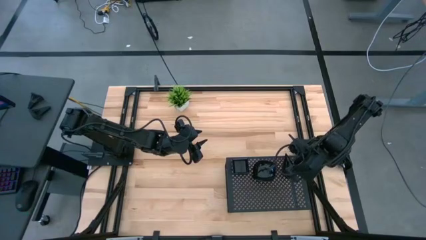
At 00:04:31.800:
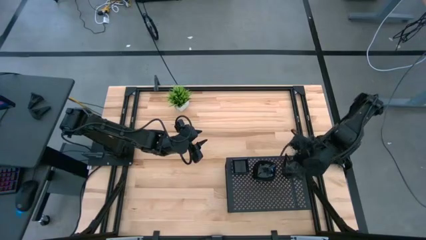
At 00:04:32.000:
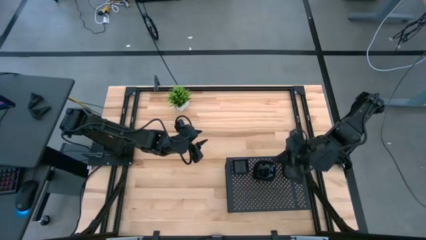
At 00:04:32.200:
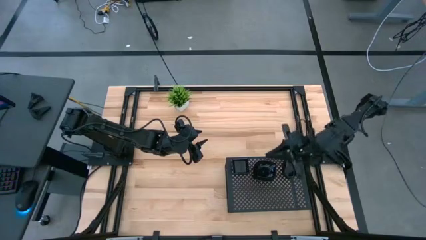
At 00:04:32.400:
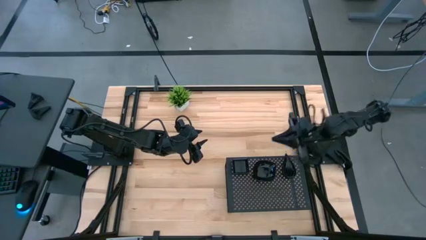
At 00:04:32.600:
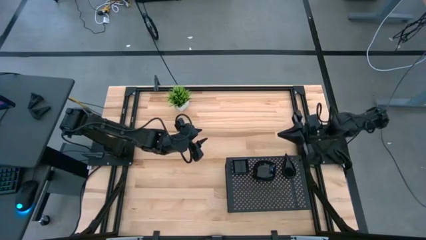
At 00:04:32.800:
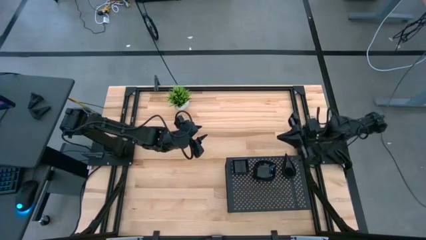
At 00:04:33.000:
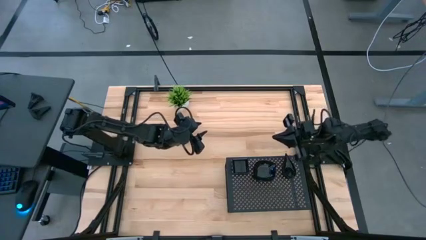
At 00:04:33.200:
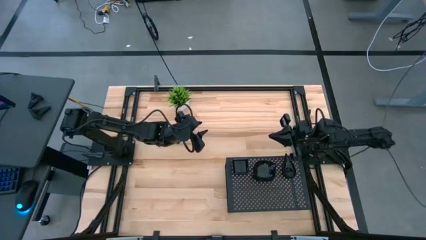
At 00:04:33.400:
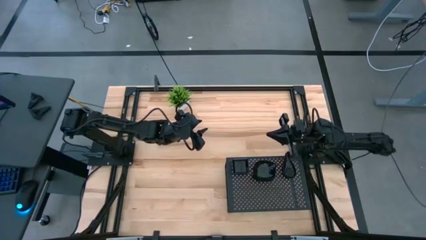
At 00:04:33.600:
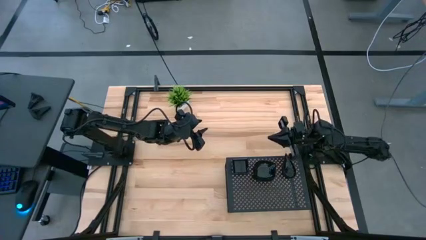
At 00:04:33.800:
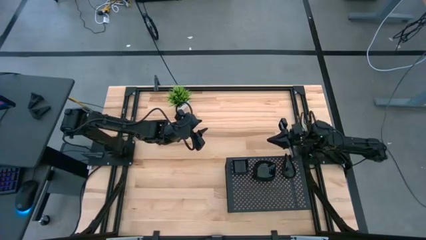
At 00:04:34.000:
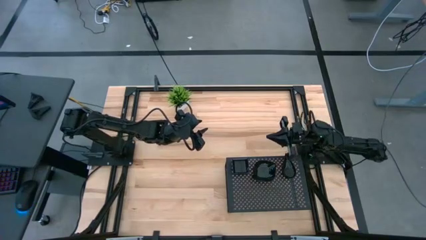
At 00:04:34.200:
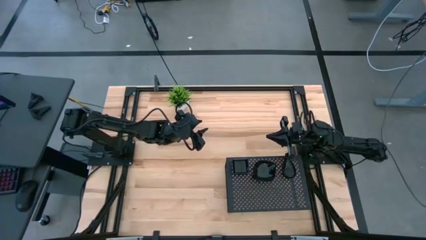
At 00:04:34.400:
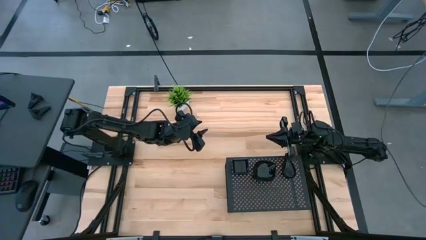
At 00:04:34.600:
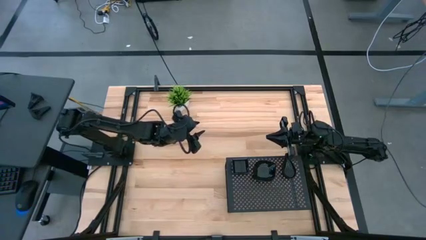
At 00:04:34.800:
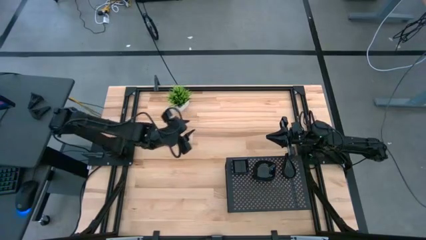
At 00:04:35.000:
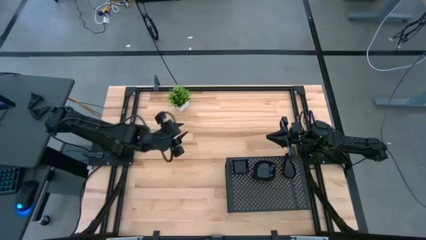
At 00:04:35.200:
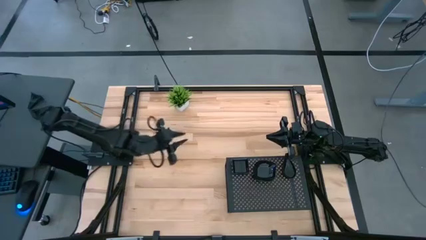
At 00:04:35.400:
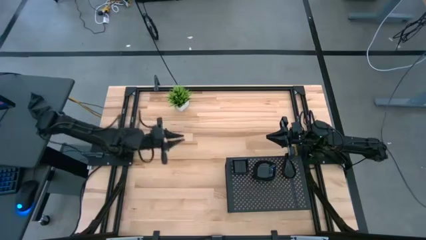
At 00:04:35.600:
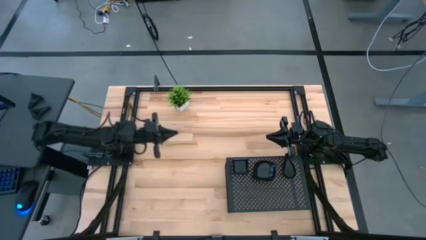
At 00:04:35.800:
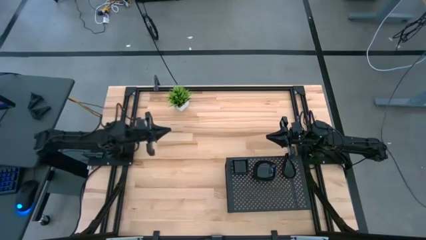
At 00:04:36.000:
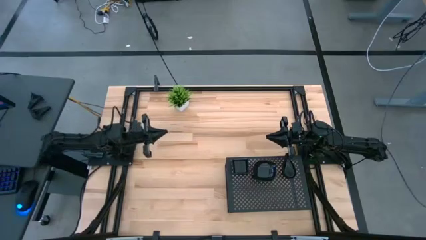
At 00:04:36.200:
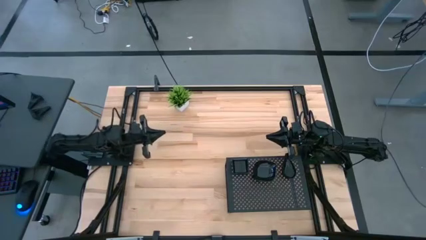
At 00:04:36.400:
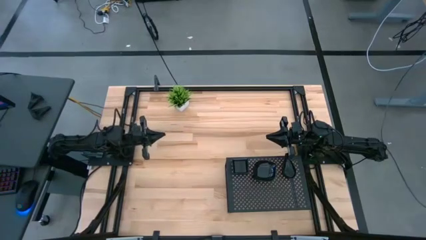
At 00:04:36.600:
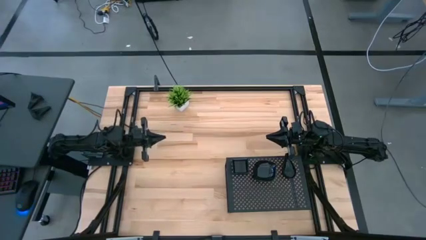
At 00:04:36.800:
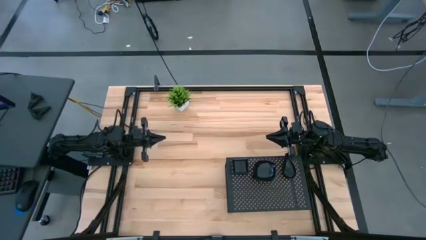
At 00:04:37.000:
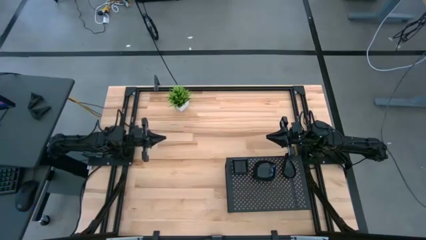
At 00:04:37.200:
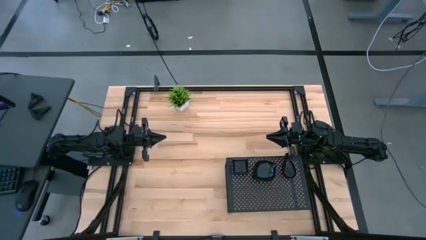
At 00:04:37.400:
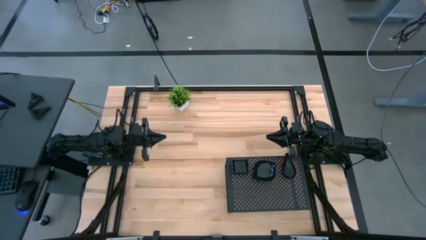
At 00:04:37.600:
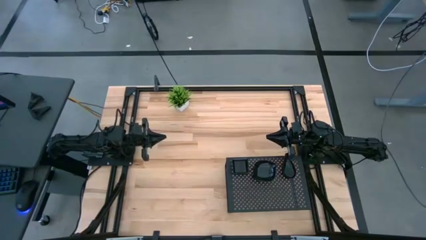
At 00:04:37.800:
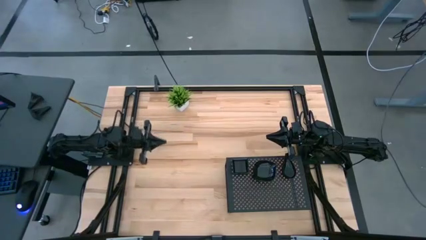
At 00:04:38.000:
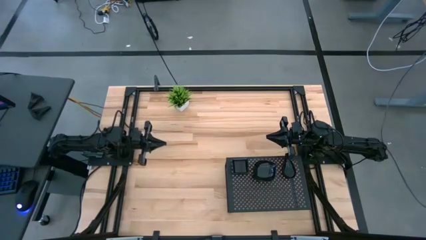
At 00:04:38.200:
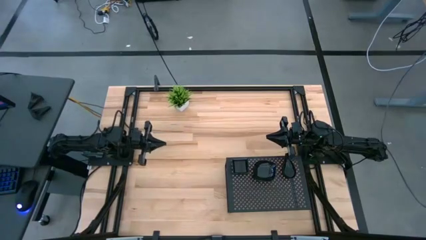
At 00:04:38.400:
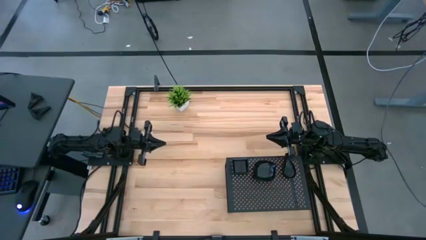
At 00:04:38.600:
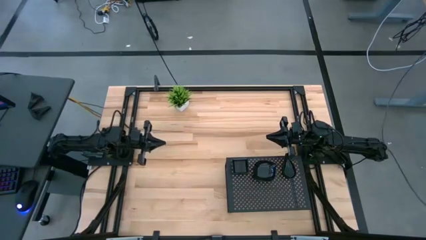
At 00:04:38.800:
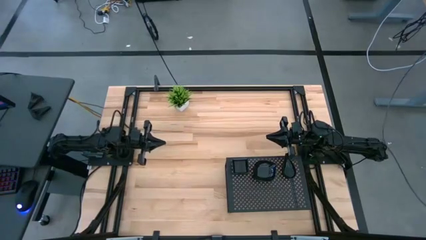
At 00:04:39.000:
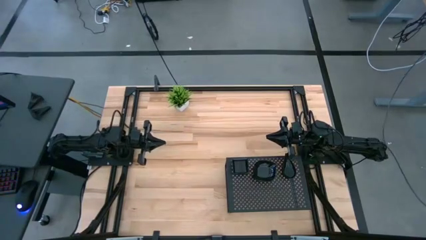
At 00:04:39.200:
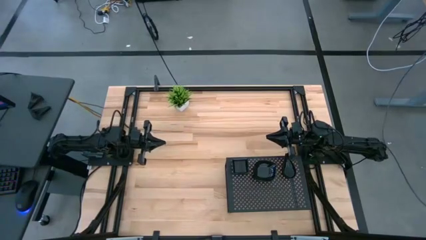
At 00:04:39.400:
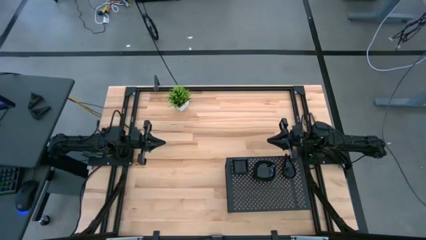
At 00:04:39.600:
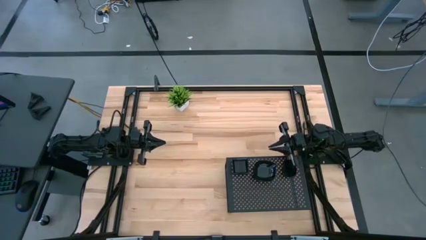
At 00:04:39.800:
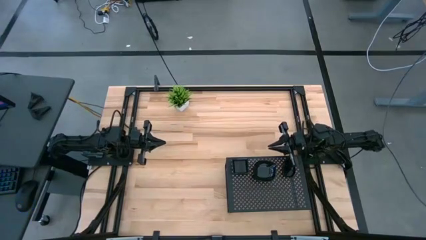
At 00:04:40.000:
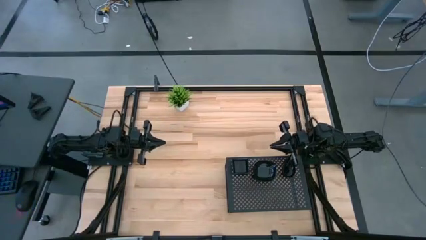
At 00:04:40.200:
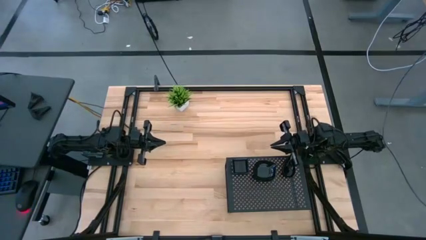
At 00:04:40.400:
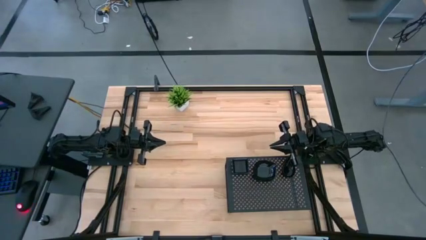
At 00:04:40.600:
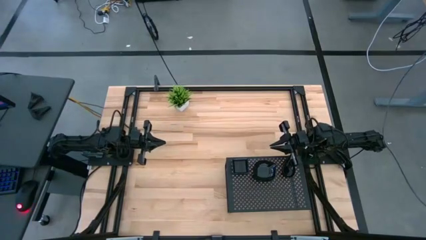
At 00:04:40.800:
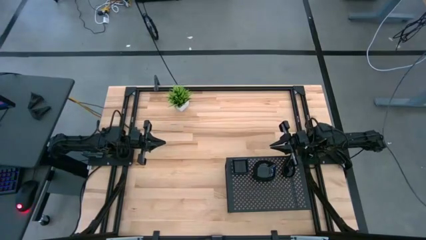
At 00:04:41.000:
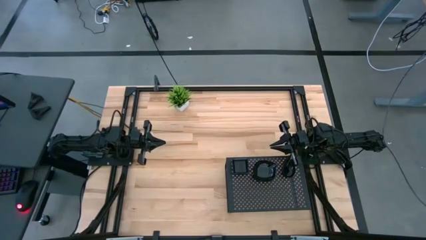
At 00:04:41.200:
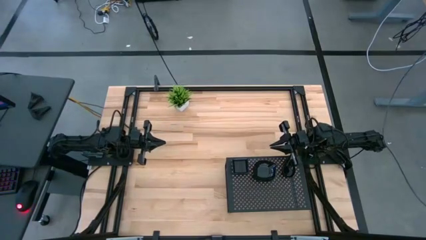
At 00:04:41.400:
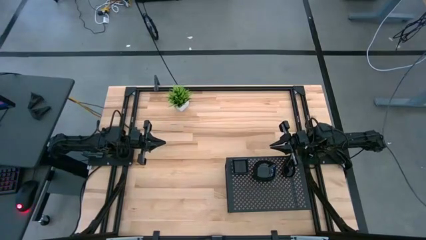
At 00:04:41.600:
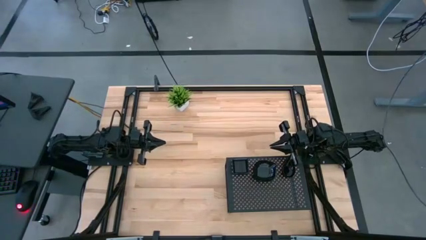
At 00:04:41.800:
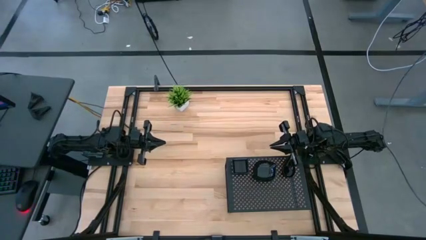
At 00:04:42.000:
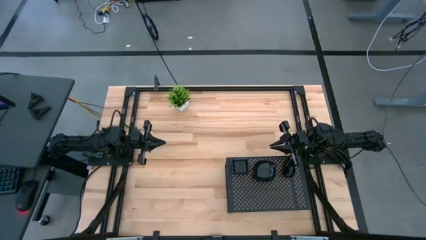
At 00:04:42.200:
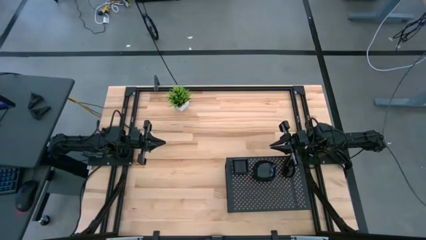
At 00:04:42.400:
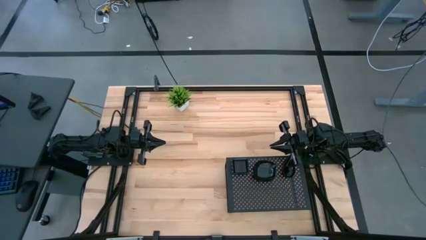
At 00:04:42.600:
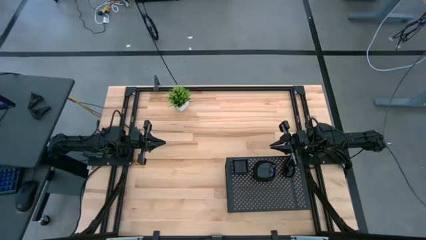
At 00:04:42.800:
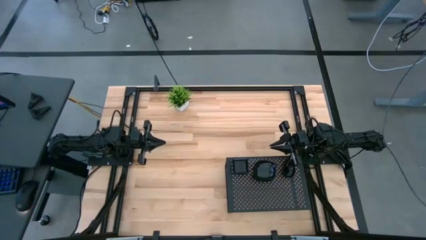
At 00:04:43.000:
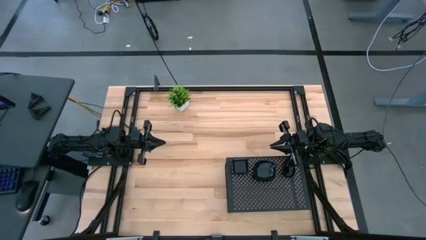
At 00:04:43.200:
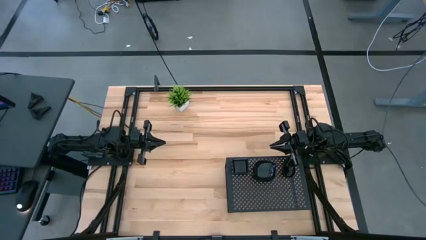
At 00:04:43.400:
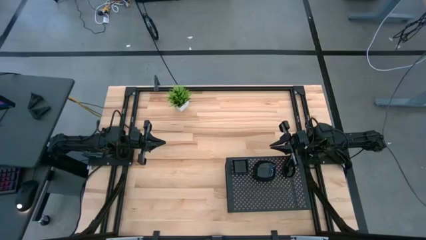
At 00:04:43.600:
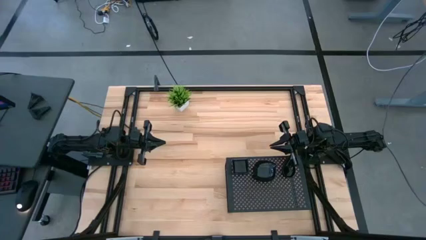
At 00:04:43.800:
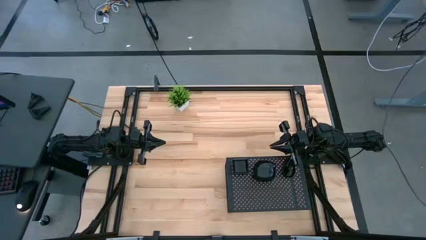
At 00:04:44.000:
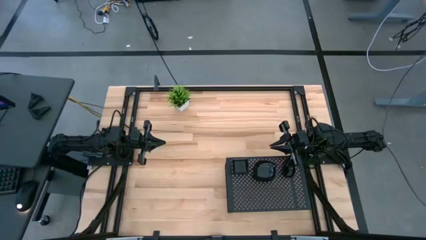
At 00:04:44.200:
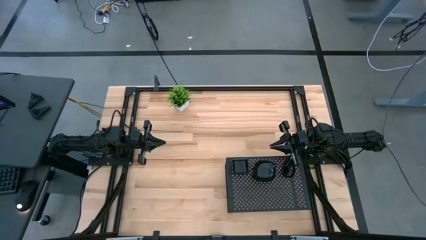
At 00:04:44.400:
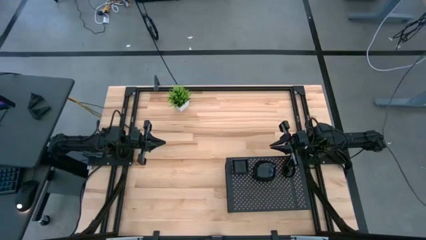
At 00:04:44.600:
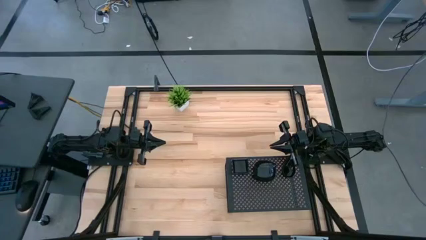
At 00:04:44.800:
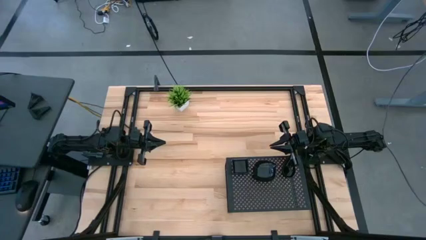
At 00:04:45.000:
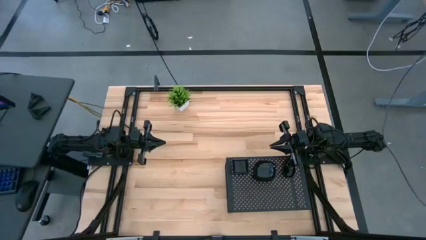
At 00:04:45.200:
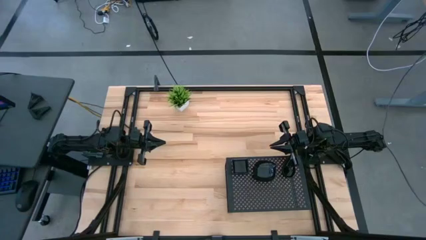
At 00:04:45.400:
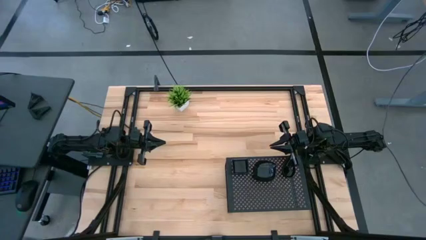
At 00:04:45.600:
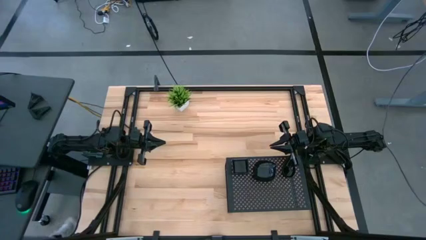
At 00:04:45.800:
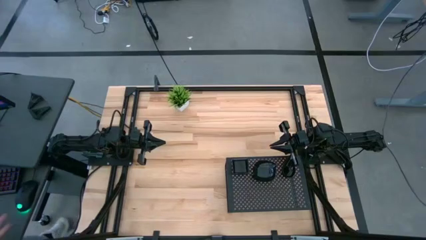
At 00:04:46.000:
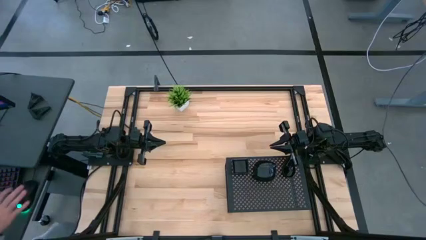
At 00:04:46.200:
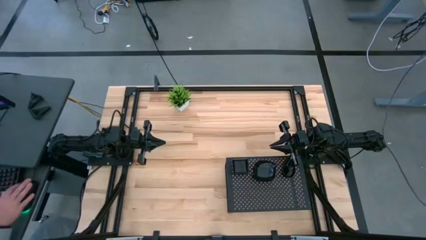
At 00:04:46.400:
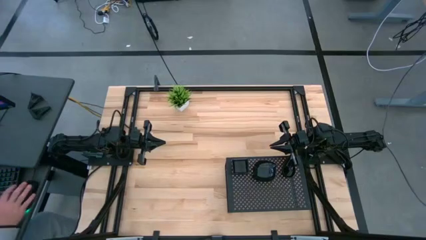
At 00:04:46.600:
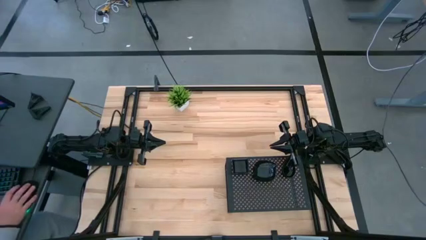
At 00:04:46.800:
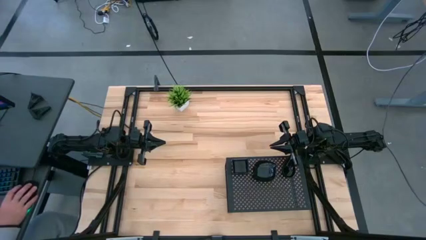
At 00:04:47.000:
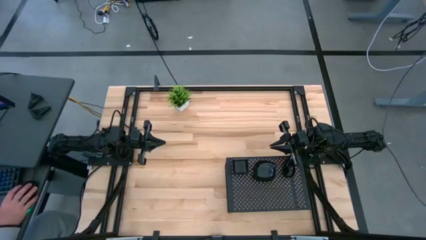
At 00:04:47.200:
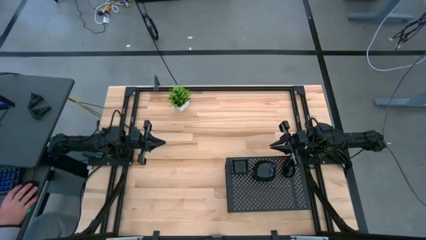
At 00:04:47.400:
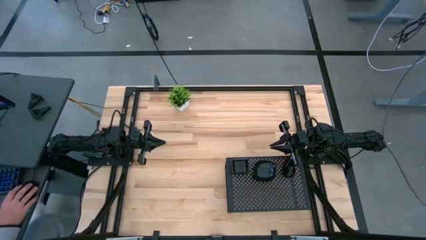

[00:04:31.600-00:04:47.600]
Task: Pick & Place Mini shaped plates
Return to Home Position
